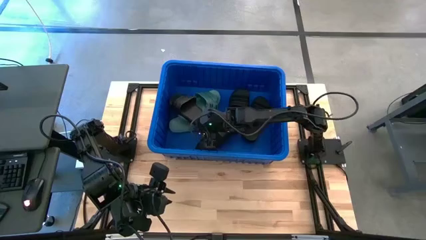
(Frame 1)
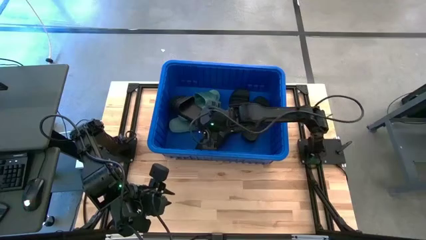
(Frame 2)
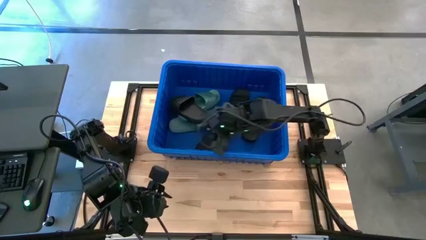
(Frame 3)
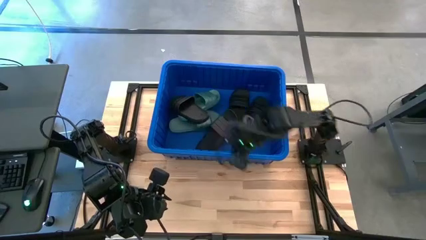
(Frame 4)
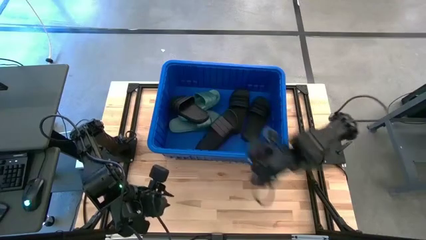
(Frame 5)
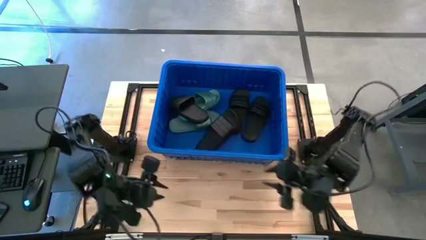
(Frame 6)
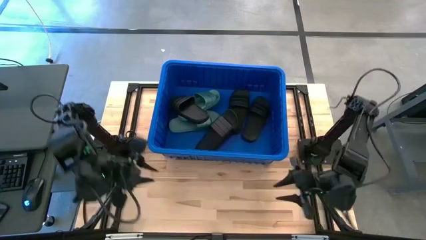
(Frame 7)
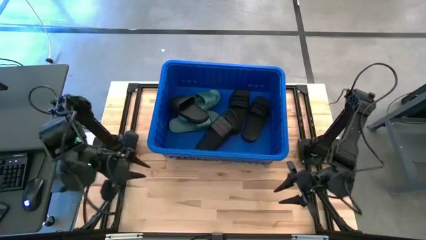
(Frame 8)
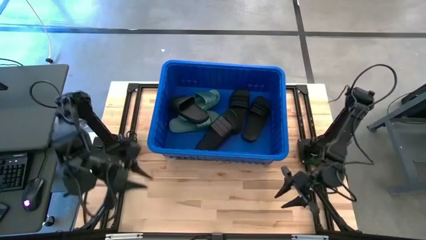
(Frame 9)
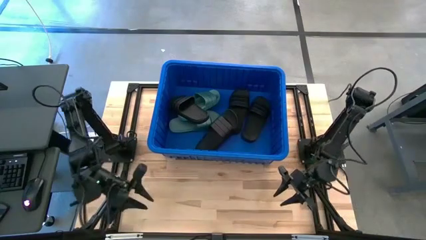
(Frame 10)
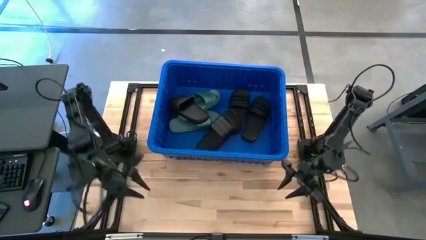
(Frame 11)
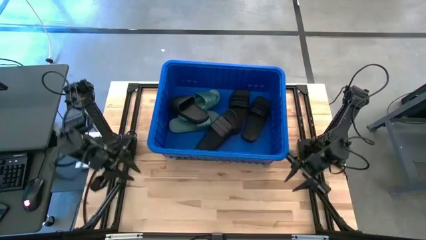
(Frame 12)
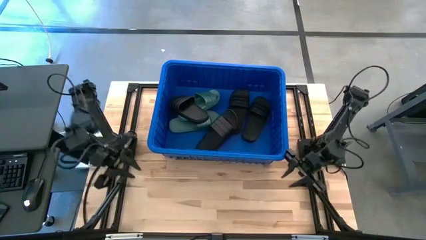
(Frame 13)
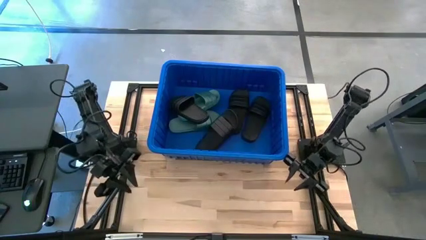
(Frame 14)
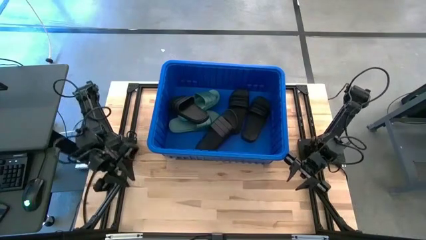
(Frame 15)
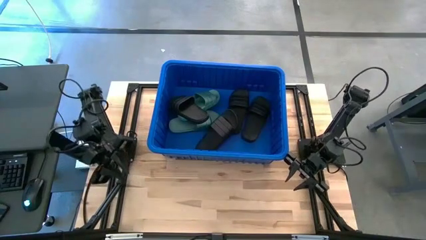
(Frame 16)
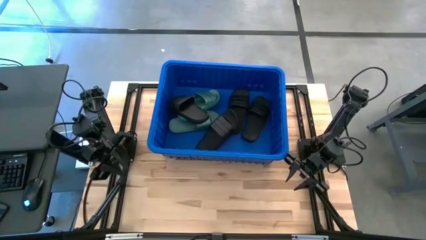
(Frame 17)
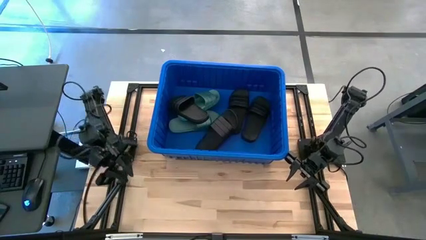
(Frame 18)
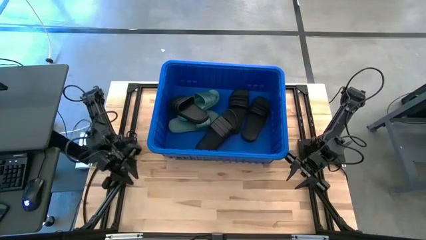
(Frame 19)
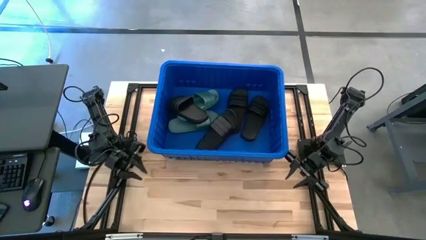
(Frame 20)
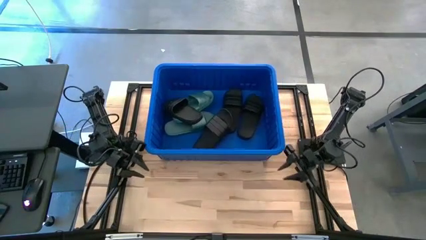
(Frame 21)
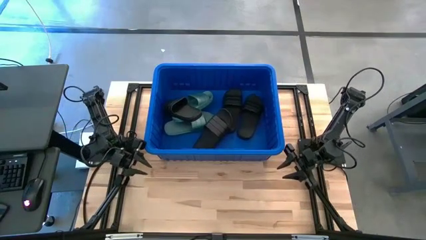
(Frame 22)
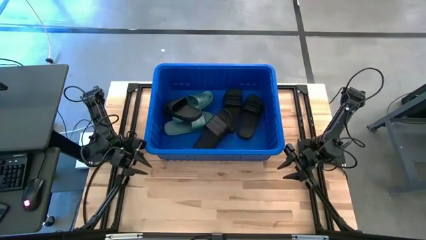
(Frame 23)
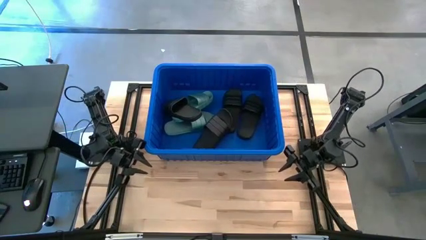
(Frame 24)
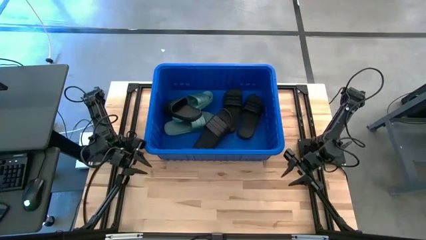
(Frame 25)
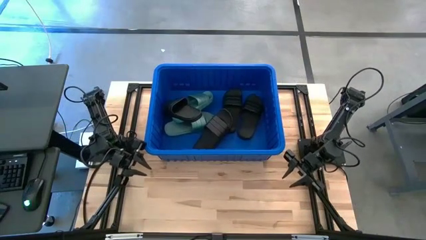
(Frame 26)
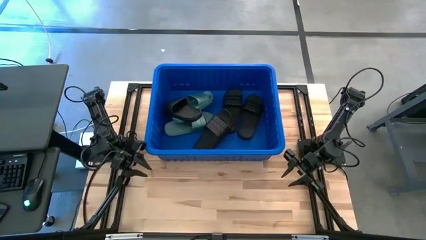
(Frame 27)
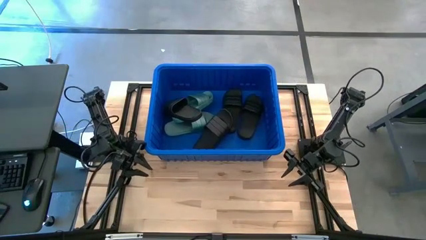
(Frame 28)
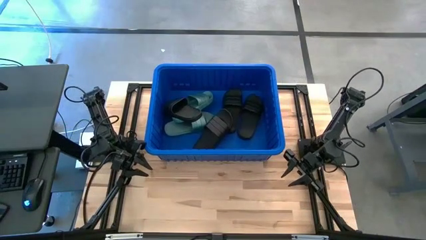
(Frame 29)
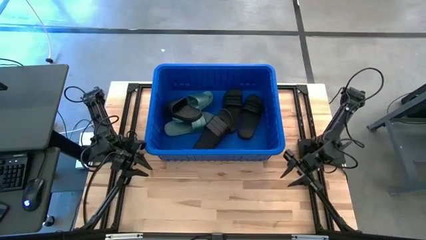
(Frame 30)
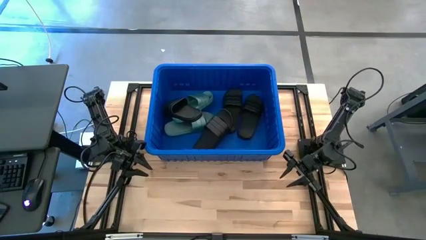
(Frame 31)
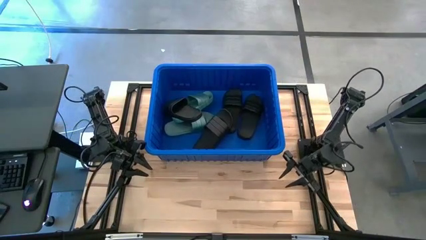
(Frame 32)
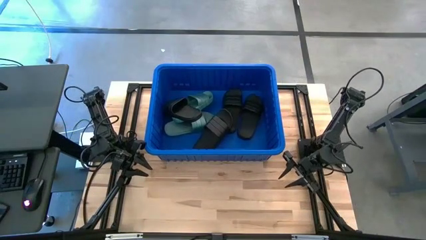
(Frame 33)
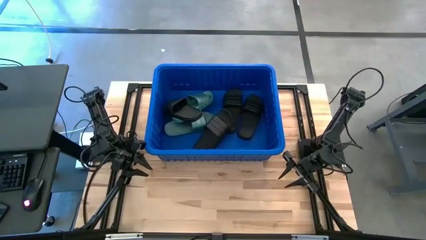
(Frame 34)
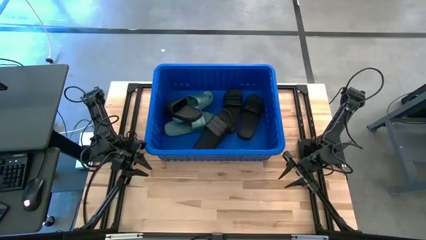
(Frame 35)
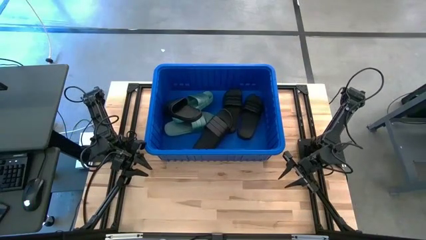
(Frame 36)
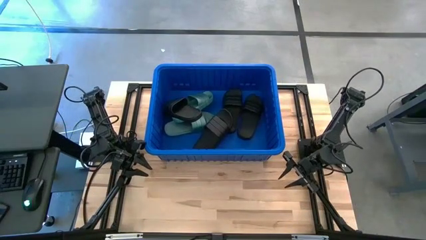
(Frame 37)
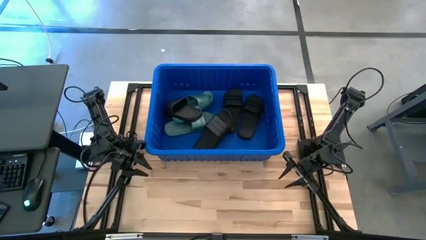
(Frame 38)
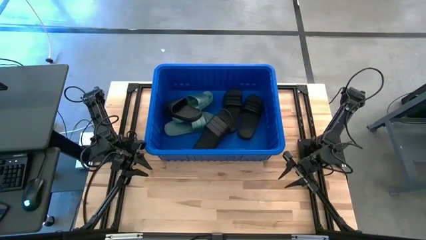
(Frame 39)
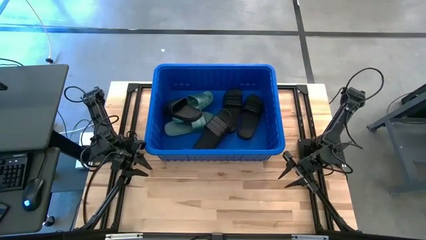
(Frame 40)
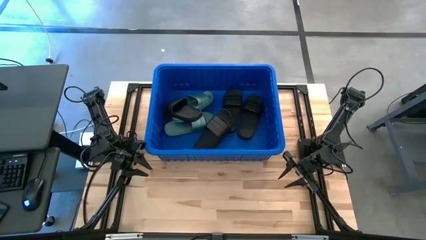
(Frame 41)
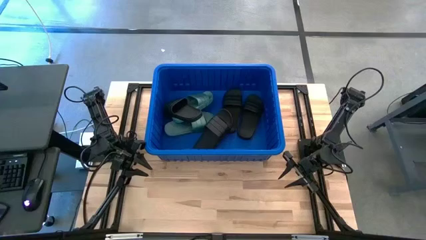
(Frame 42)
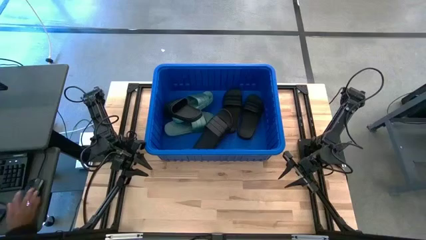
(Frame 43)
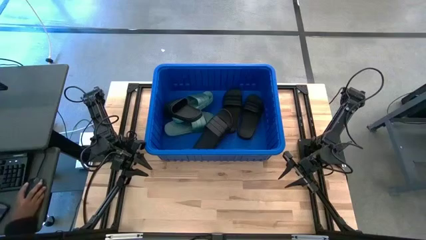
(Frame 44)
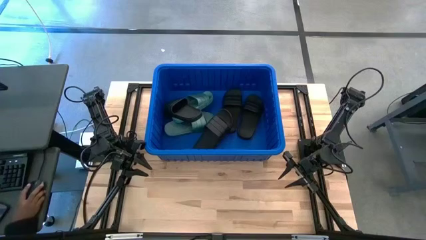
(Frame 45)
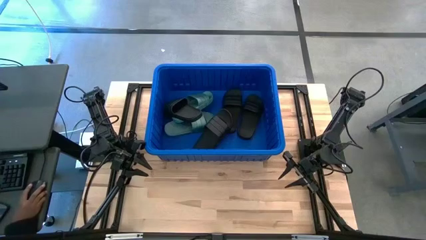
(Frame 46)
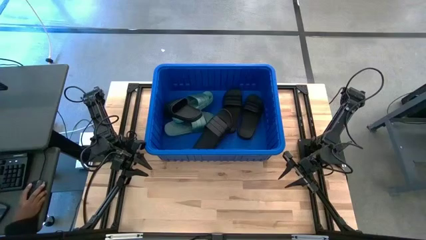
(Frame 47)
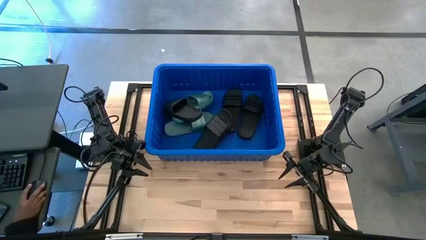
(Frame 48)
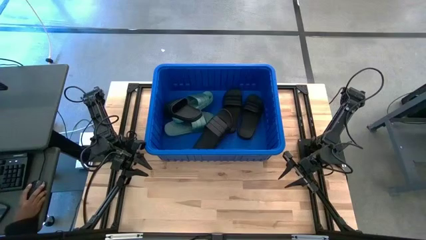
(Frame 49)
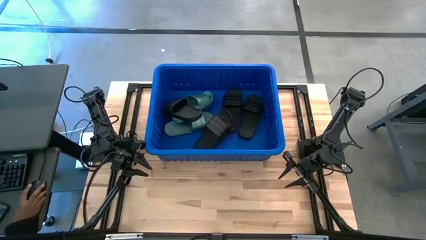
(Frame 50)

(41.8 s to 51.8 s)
Task: Pick and place slides into bin
Return to Home Position

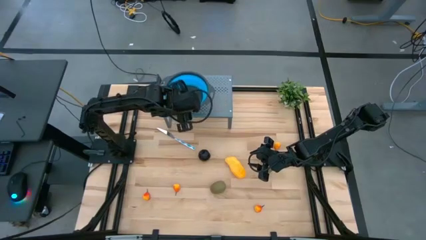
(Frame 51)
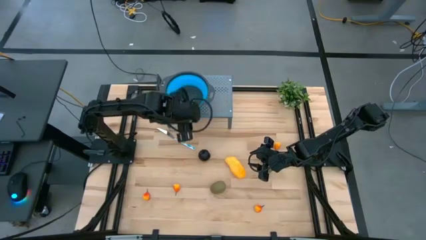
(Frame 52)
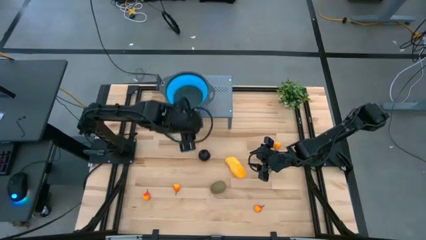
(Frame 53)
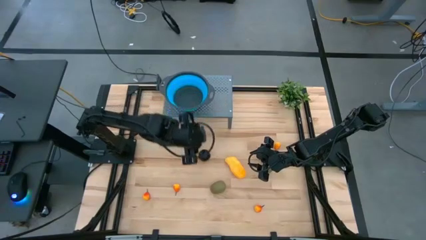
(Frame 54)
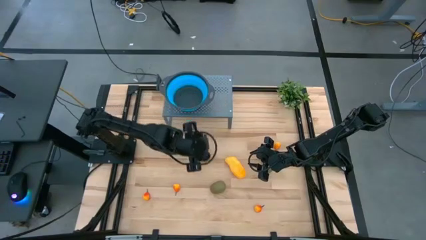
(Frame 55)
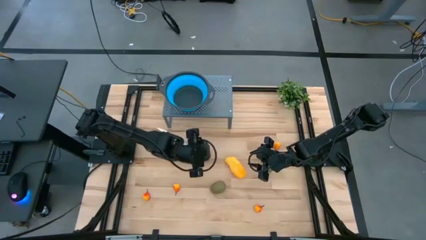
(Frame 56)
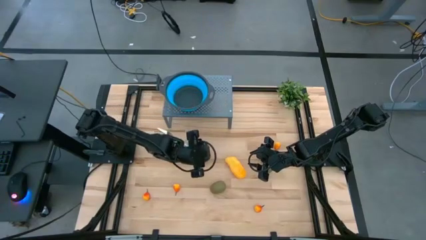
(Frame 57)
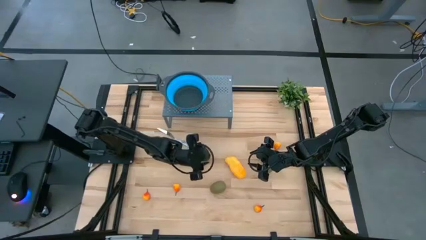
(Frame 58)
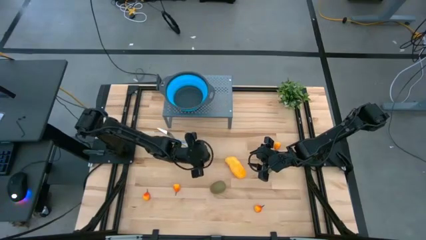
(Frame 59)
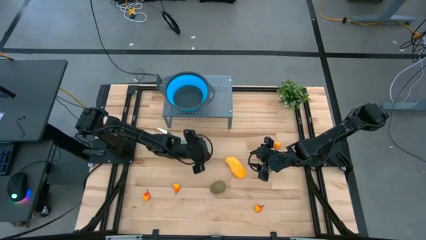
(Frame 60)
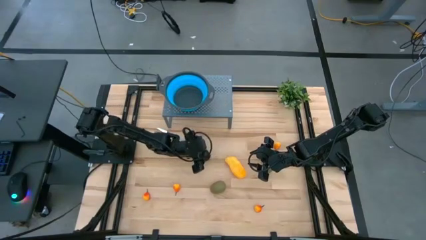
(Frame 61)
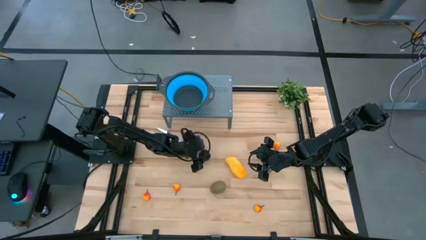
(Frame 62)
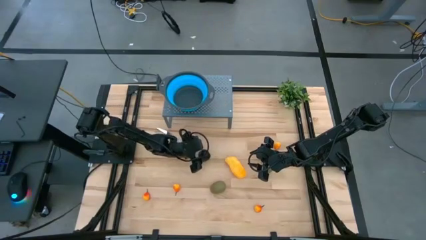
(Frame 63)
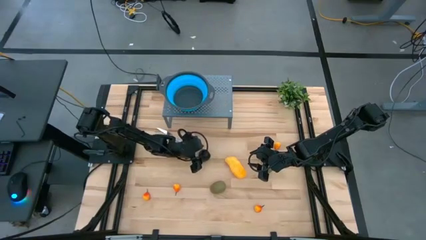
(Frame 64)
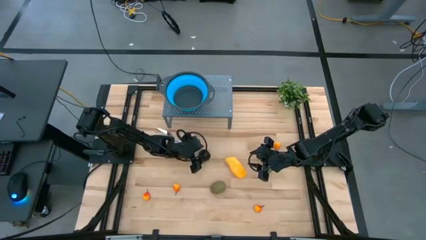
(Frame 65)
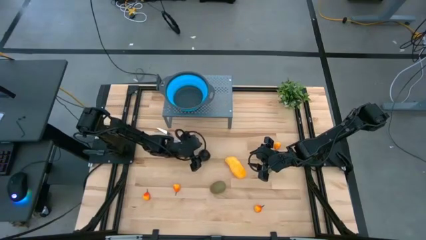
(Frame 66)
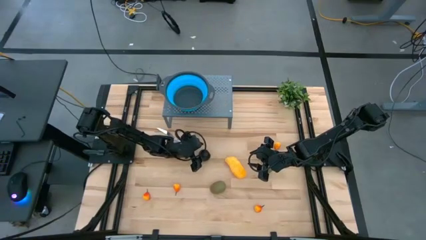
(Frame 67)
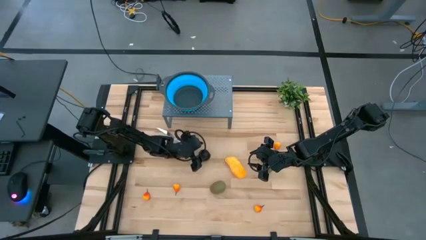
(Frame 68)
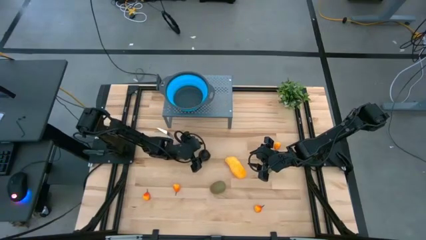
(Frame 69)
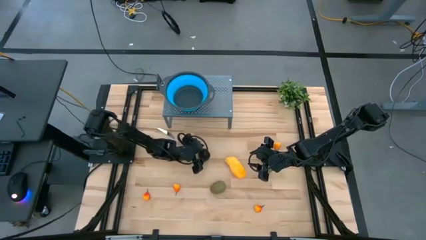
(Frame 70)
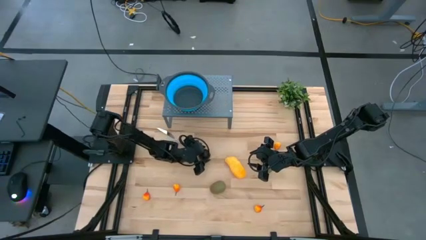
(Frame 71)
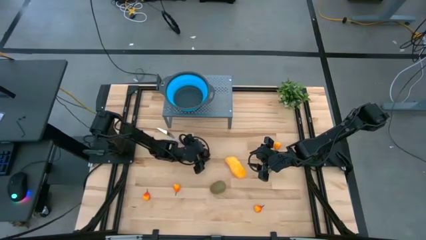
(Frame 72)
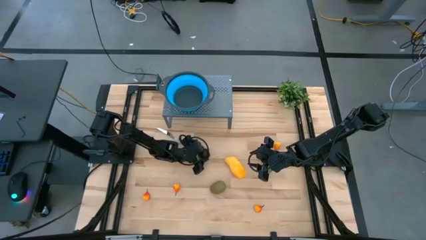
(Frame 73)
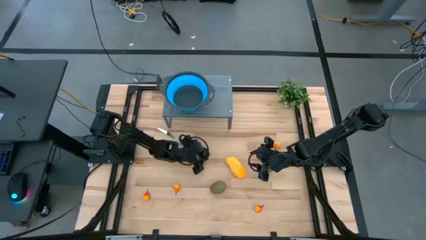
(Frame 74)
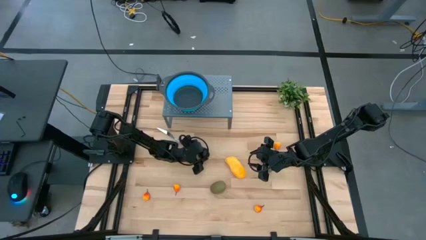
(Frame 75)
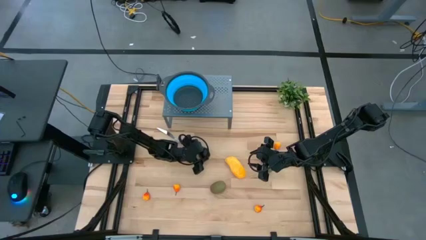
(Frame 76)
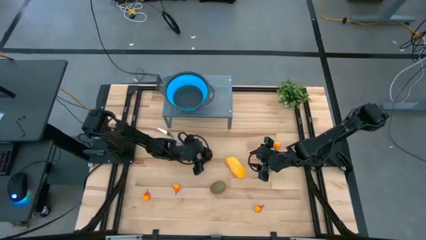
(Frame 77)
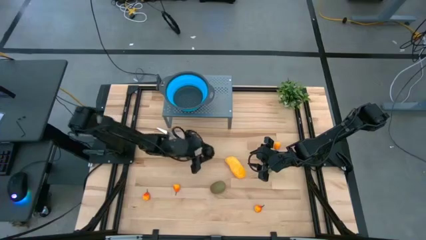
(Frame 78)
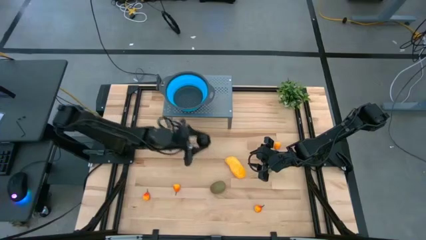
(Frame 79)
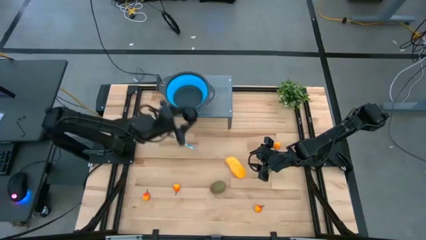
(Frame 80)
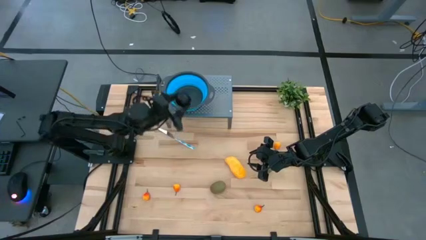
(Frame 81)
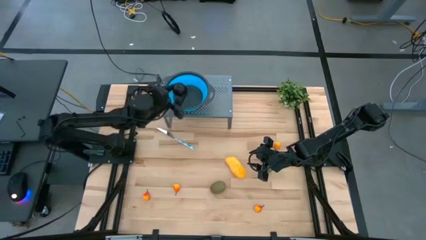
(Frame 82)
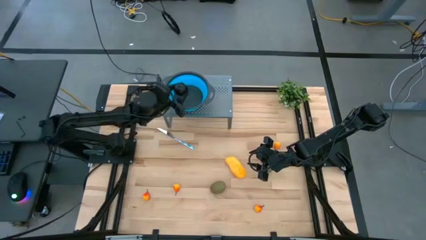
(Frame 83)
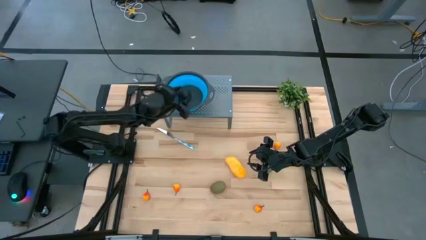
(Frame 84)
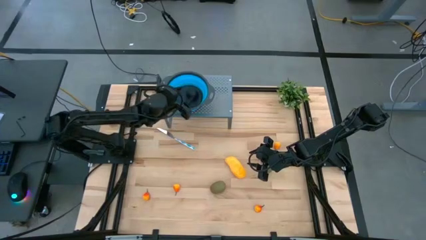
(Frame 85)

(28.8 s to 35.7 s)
Task: Pick & Place Fruit
Put the black plum into the blue strainer bowl
